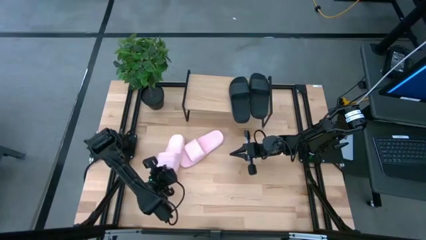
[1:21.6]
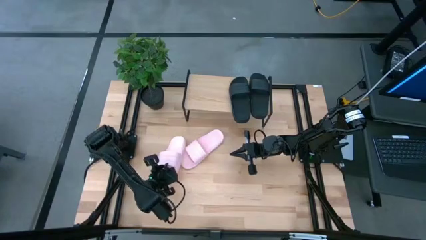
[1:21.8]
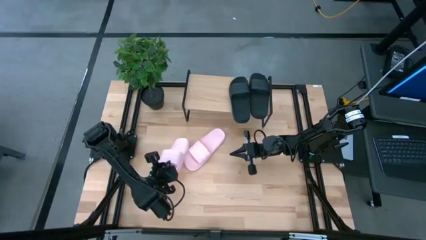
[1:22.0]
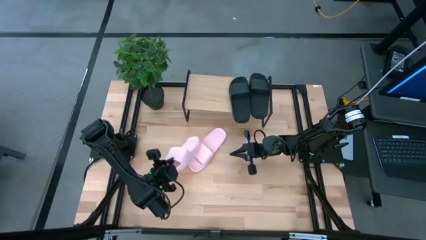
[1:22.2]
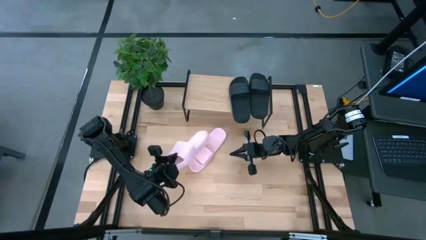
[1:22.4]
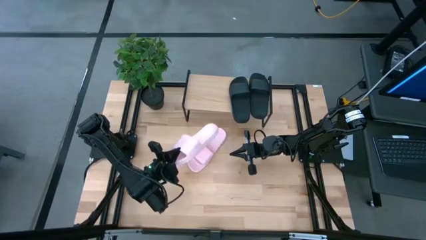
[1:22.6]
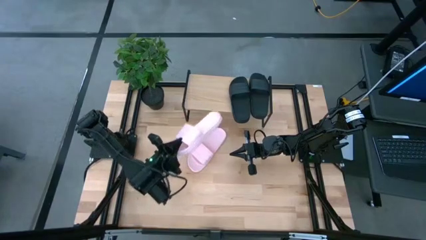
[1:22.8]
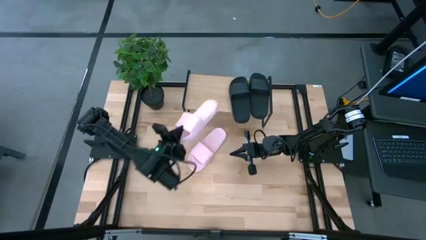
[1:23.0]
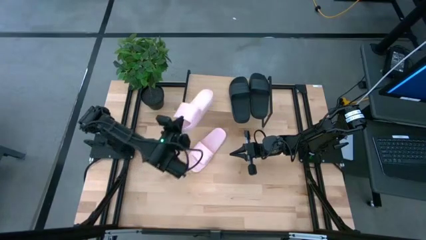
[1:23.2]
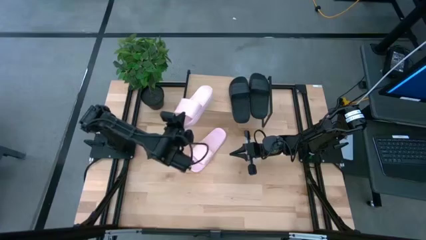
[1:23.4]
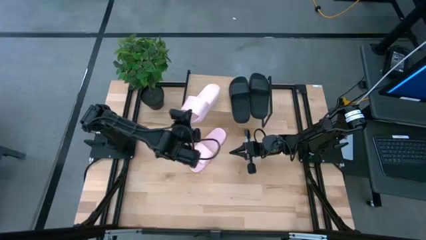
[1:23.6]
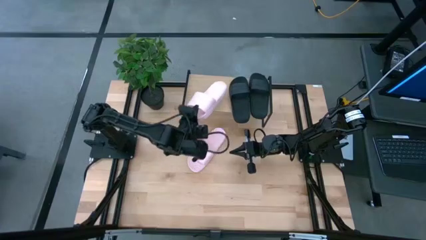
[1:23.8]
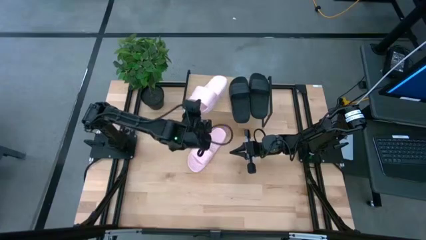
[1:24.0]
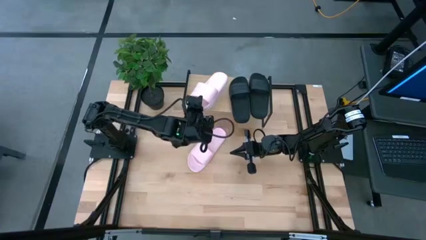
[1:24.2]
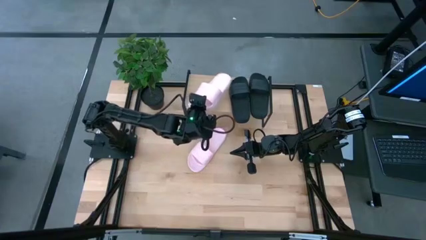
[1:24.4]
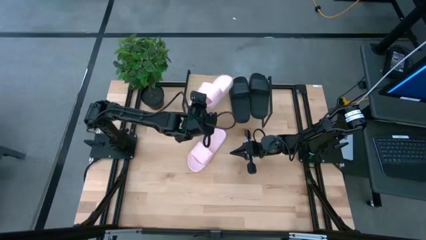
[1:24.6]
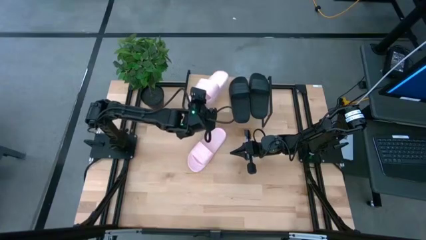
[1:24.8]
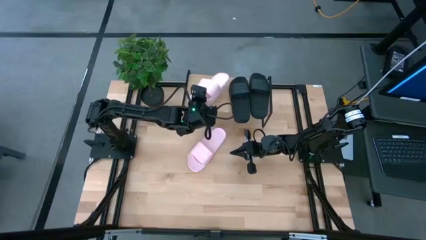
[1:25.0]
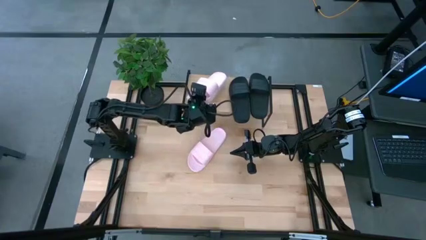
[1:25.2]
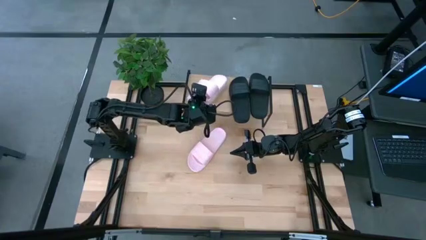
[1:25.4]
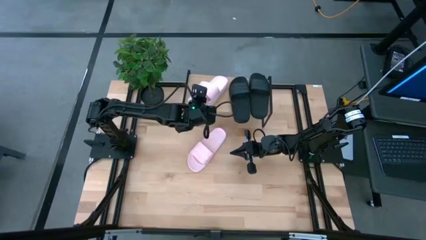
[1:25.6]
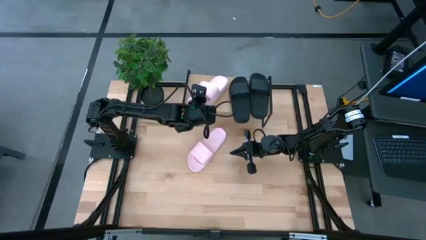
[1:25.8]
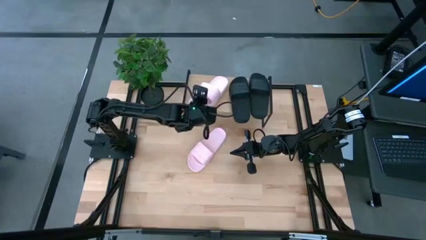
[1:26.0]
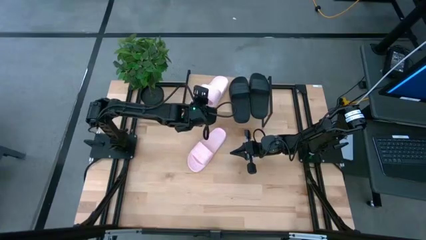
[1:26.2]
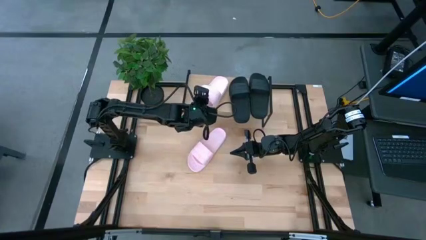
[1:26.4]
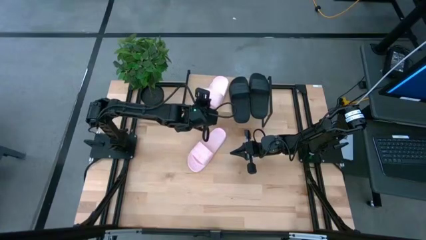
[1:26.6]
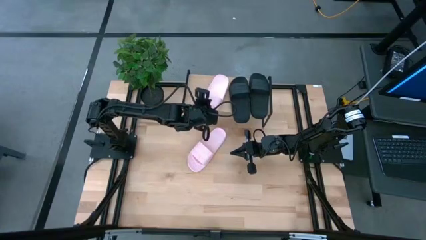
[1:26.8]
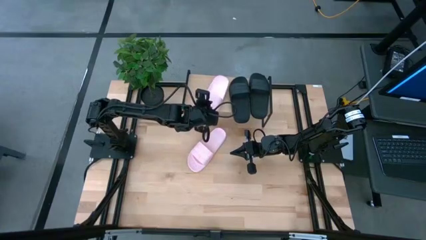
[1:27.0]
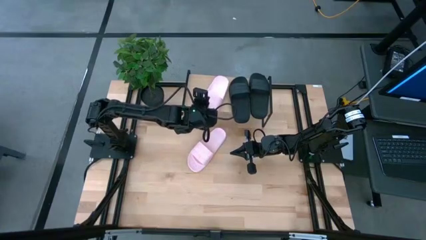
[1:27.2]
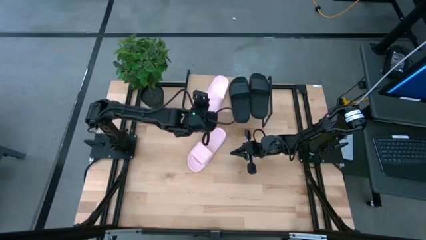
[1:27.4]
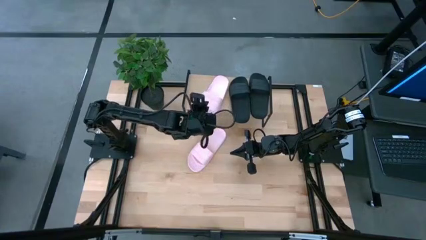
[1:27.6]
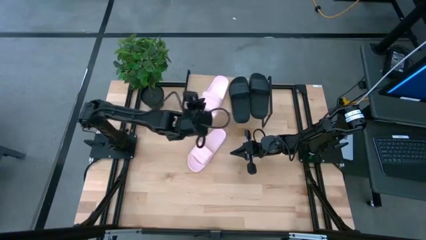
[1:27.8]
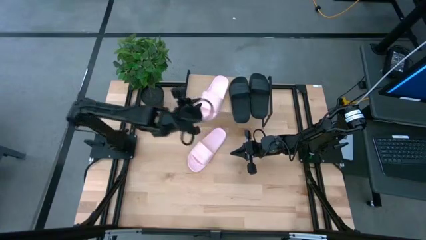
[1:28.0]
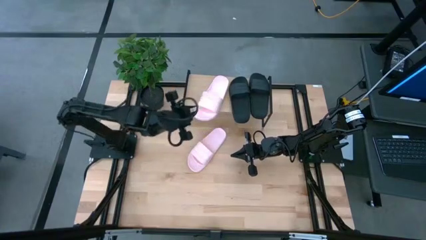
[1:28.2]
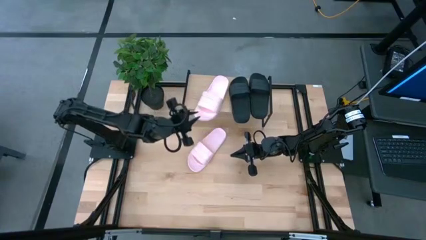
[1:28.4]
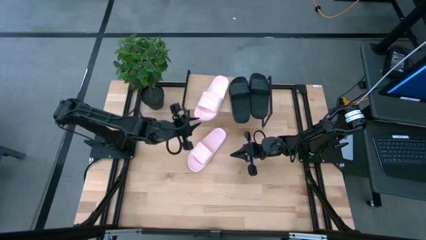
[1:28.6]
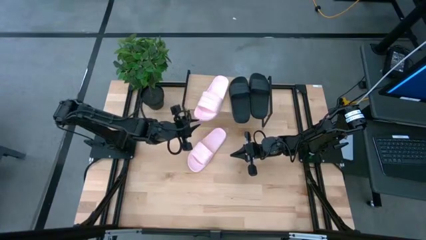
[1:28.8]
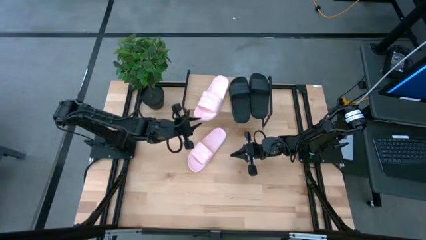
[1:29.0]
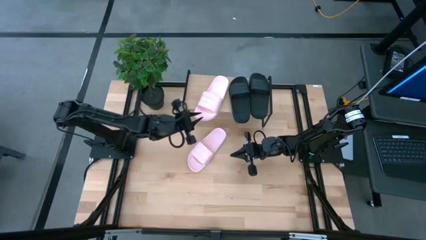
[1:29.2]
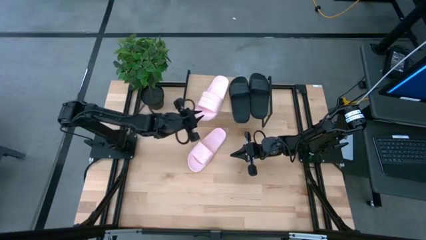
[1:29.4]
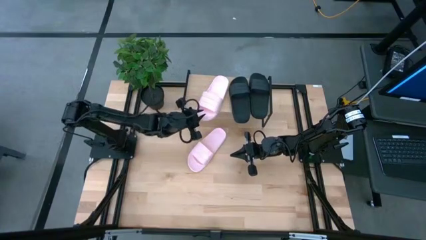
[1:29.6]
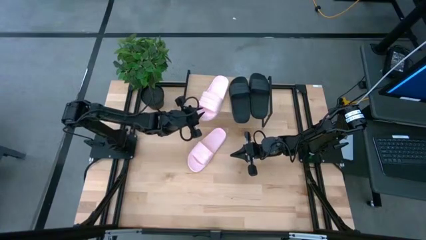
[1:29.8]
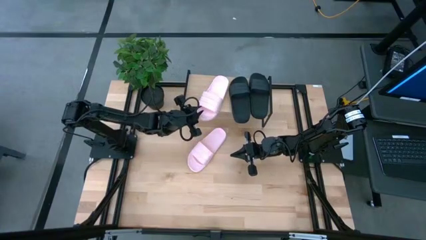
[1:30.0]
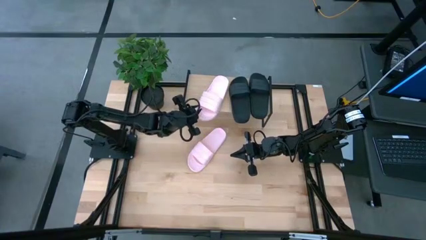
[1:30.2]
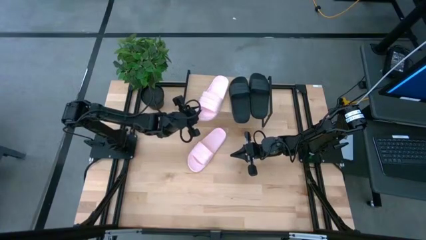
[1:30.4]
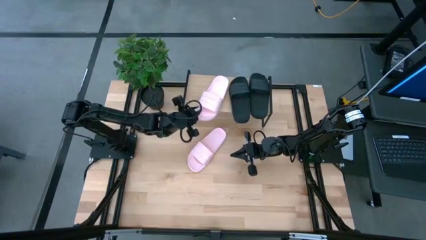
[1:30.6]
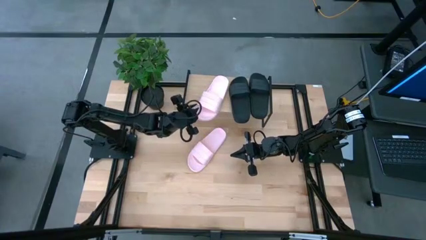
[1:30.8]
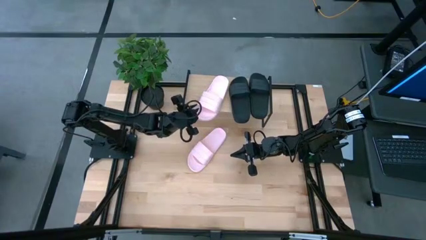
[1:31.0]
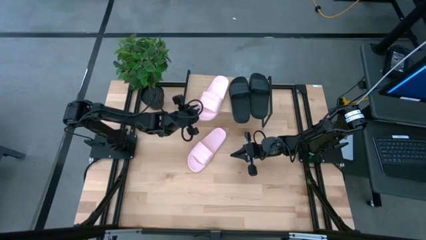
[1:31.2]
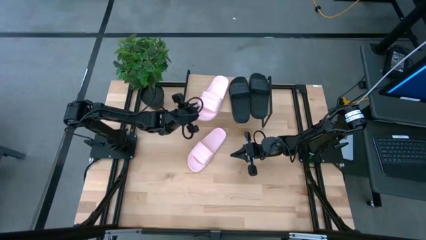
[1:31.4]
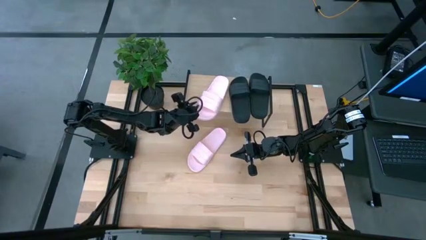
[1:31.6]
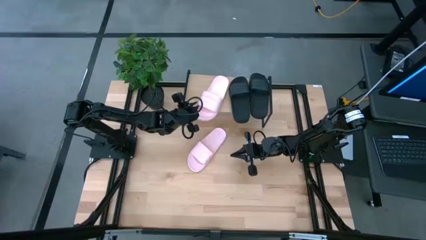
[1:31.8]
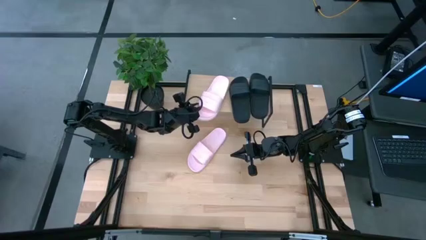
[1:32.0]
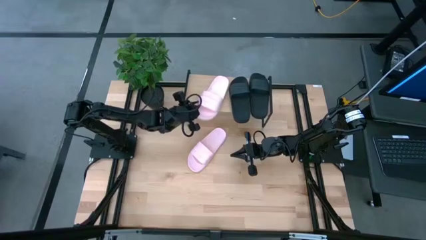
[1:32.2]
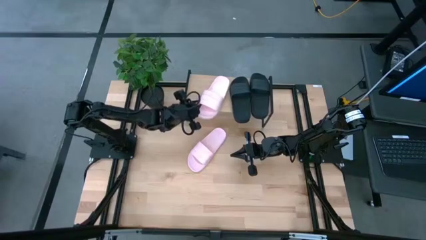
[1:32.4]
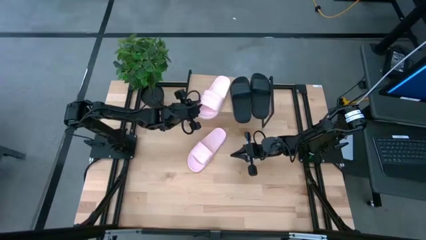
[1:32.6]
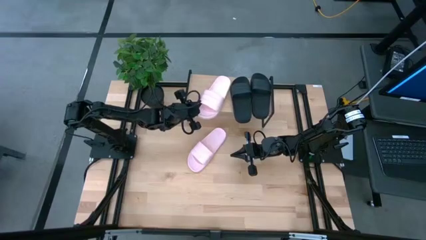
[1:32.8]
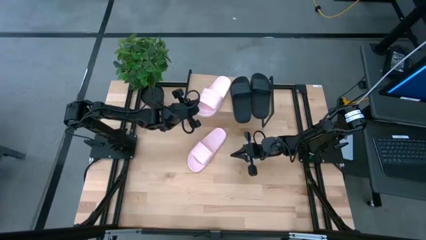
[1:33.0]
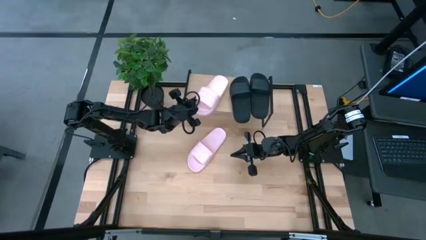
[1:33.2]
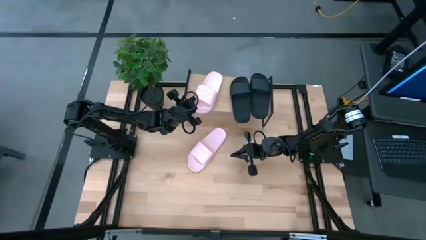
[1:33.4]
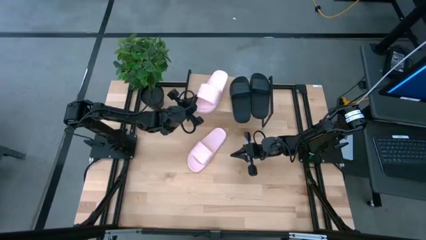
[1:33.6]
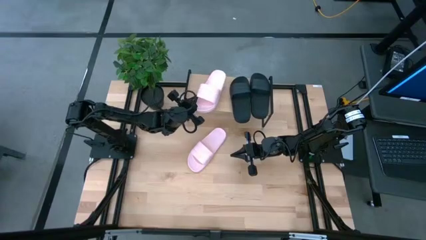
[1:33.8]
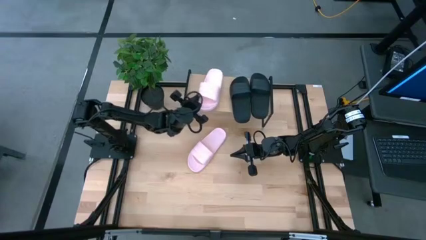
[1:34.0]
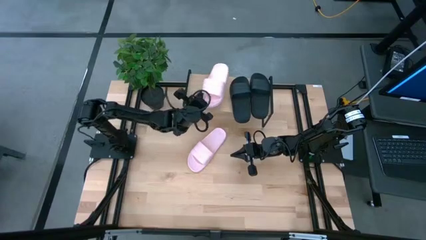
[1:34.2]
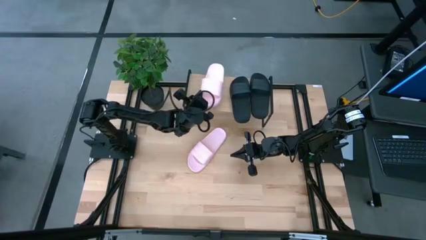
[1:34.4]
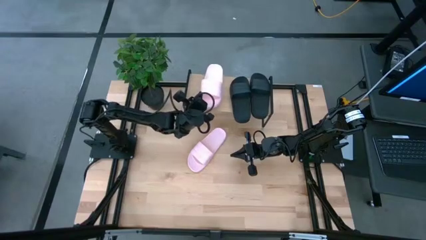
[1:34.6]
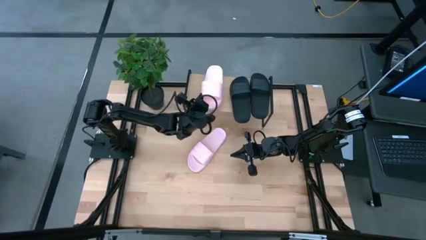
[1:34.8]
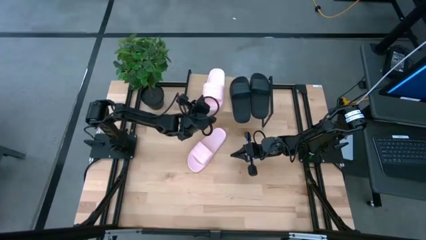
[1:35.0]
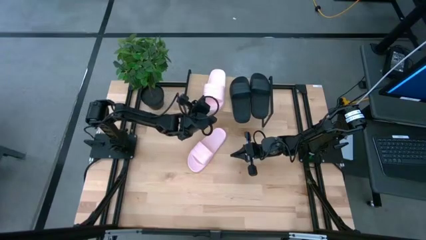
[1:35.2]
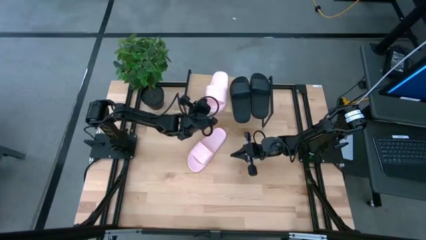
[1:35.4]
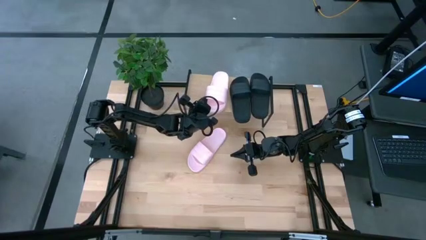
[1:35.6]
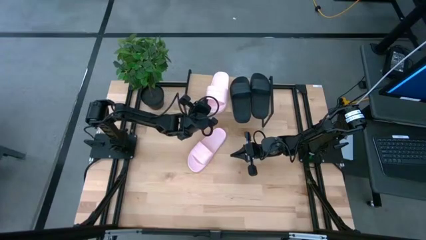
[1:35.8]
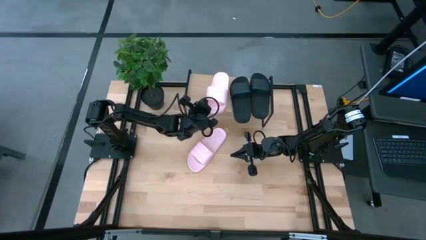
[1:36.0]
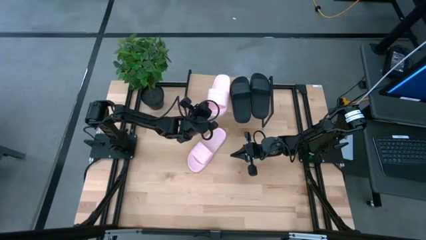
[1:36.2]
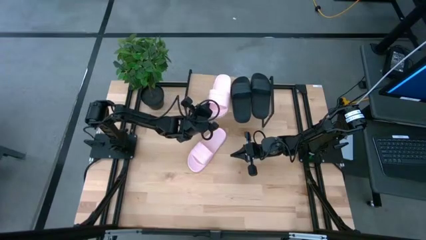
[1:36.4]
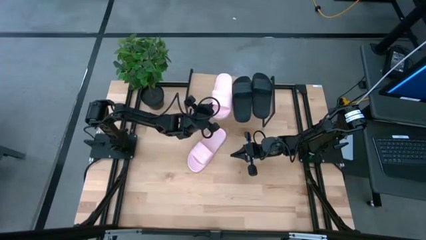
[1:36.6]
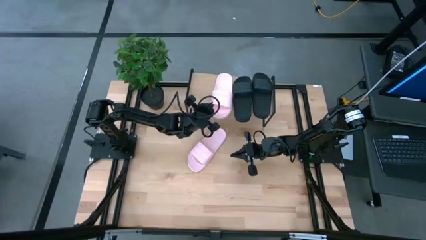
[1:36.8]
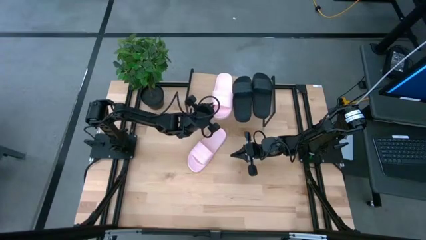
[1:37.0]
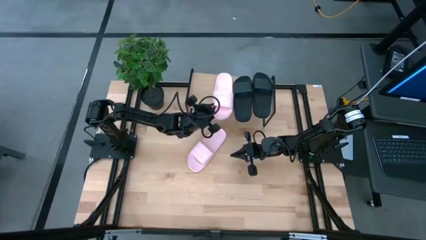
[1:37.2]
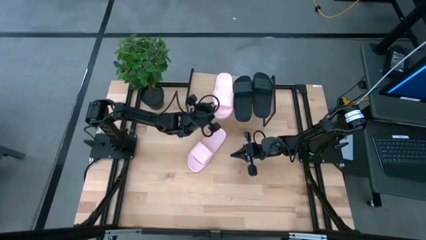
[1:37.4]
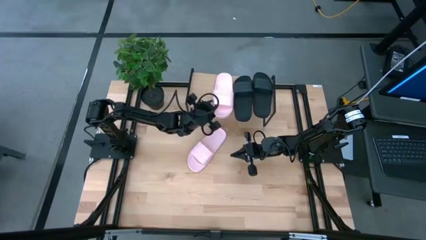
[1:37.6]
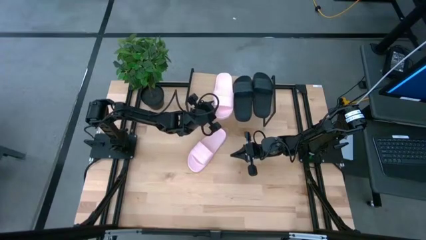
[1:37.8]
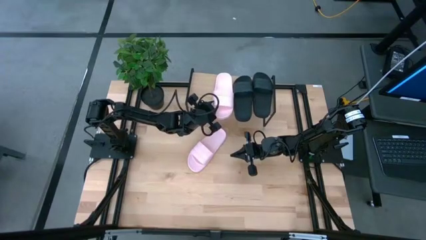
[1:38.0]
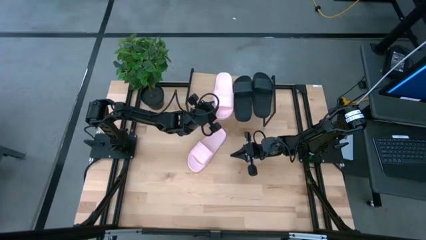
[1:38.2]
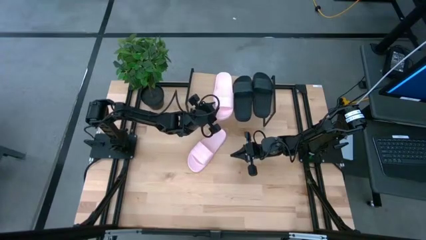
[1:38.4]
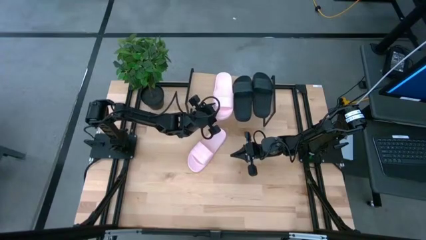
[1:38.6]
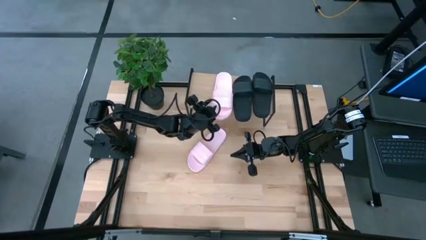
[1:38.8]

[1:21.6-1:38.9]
Task: Pick and place slides into the shelf
Put the left pink slide on the shelf
